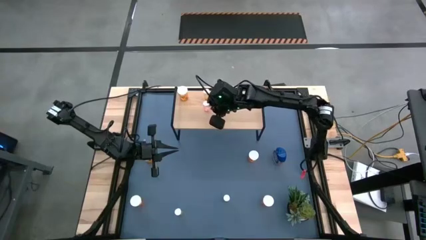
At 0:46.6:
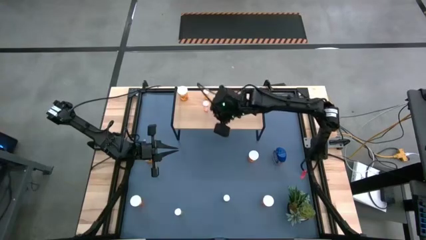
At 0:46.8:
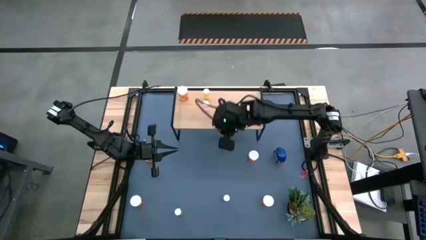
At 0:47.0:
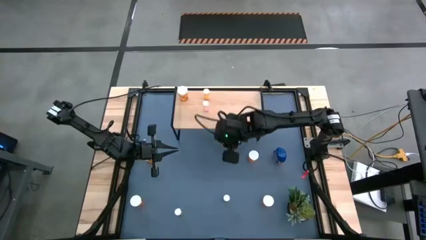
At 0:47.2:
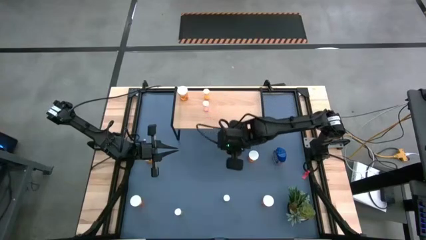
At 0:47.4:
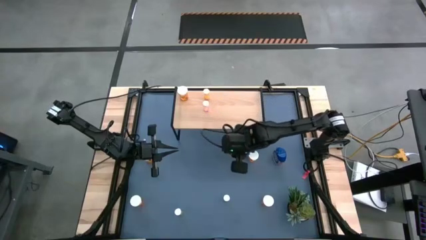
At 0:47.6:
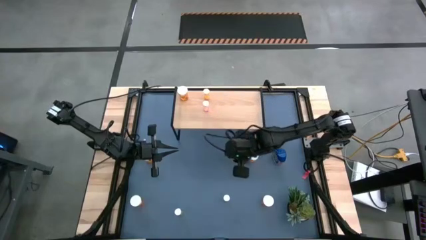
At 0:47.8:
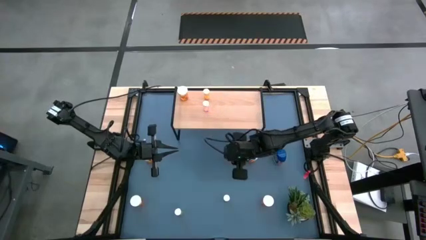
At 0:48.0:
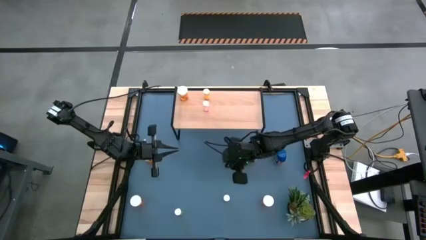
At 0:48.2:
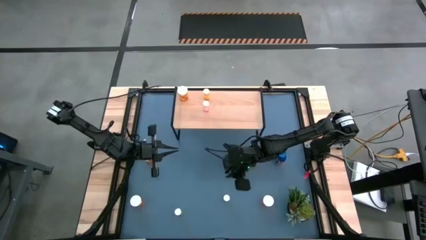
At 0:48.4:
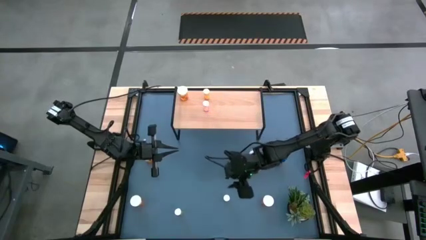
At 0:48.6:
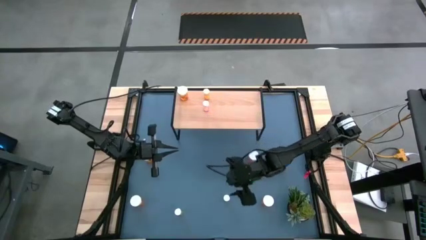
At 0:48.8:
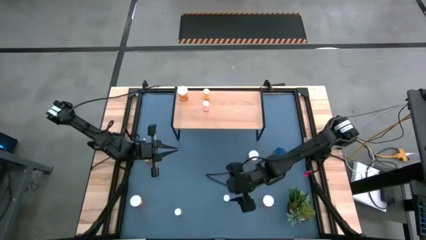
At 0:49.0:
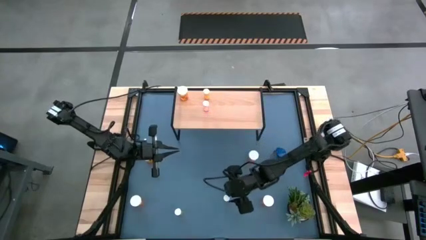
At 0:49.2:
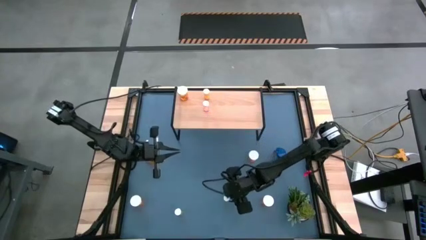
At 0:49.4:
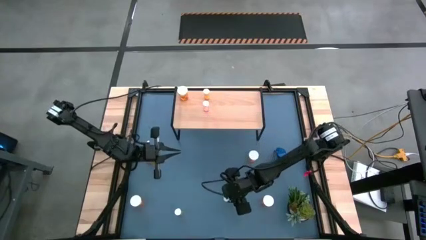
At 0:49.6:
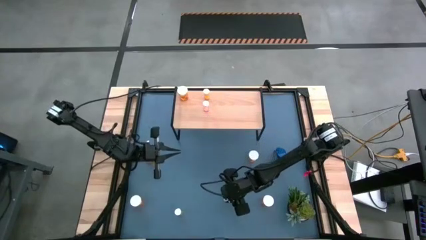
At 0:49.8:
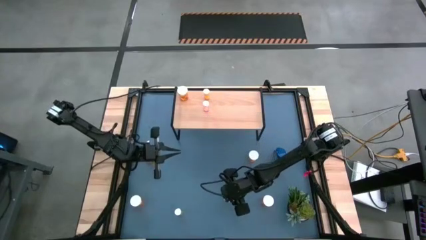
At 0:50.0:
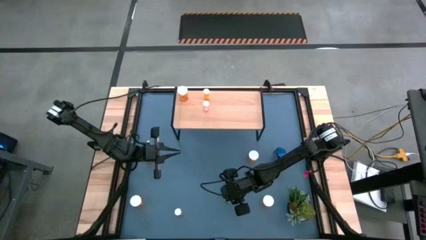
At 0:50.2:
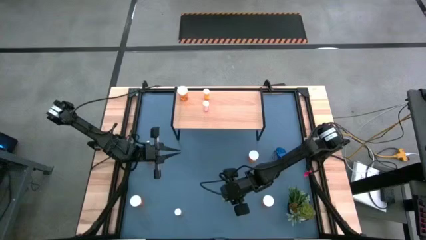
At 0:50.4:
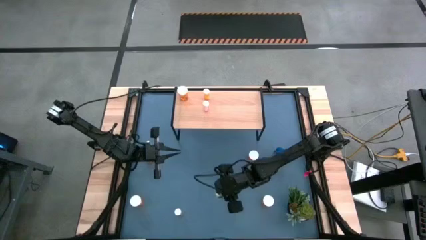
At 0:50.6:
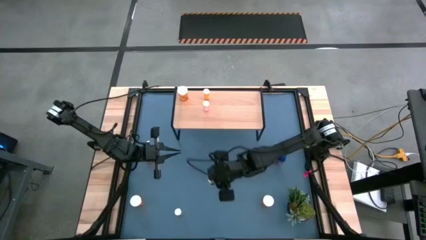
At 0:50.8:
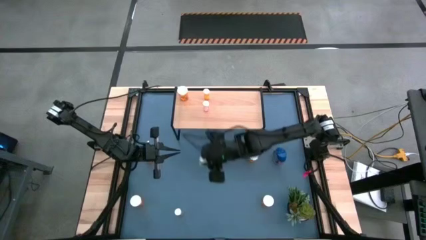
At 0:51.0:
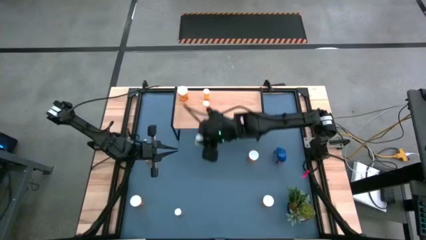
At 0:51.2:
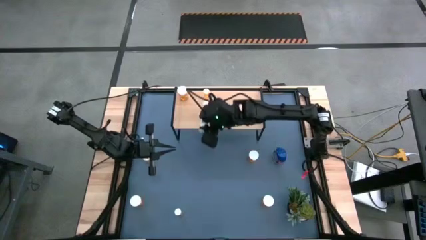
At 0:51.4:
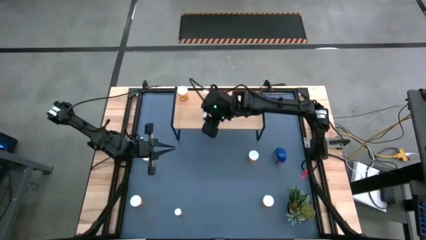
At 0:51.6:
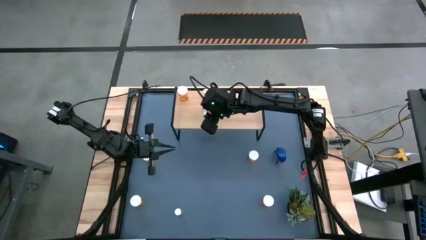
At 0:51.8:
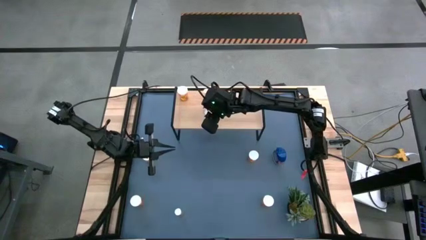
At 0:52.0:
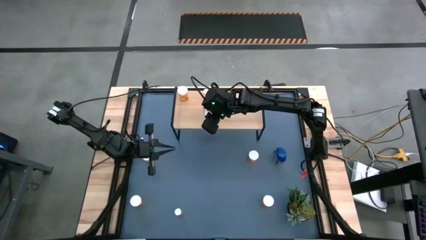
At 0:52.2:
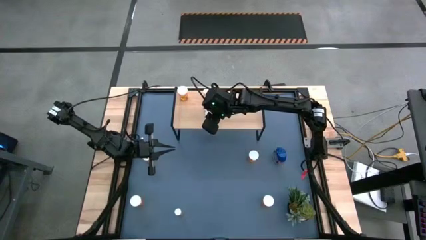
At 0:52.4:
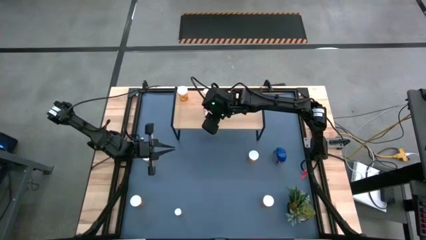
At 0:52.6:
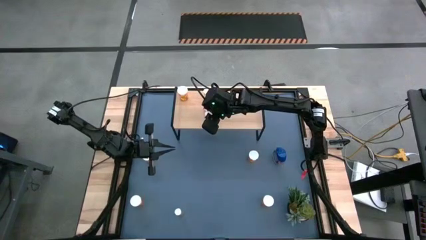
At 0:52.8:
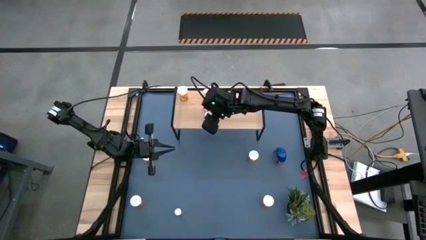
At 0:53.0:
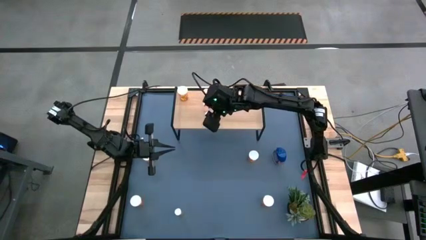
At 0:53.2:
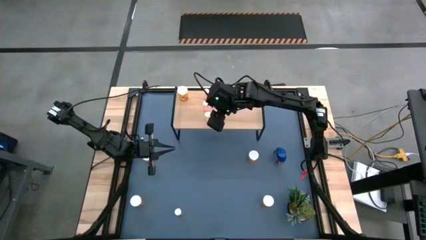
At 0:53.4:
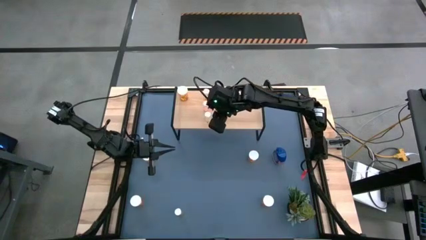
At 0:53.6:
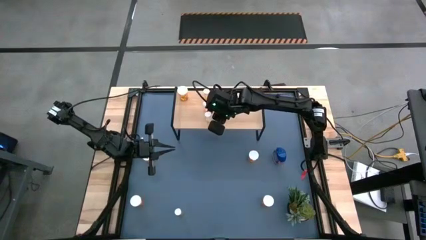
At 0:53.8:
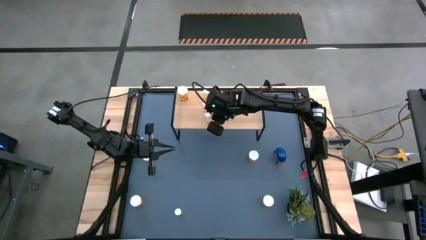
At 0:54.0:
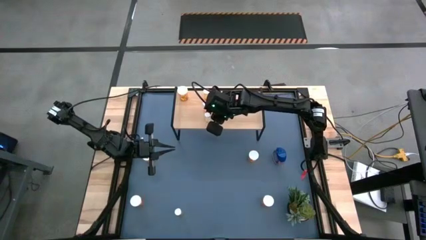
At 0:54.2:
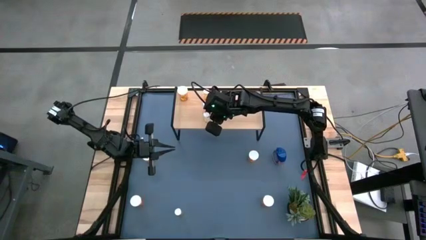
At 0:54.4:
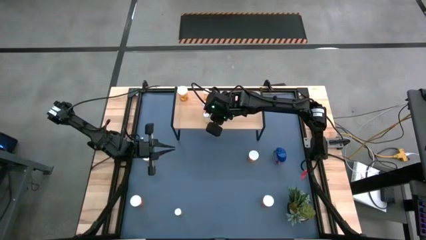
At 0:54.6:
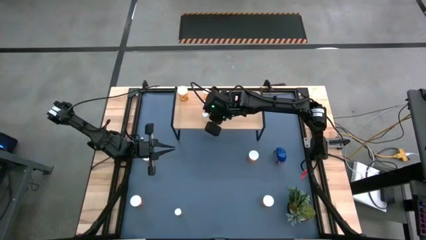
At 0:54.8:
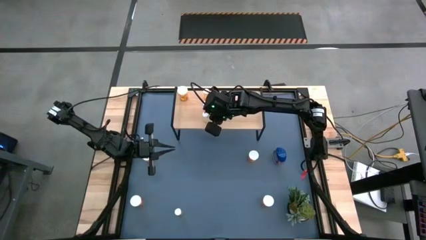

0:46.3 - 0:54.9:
Task: Pick and place medicine bottles onto shelf by color
Put the small pill bottle on the shelf

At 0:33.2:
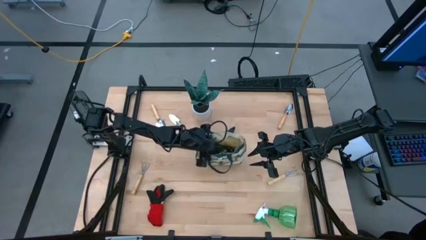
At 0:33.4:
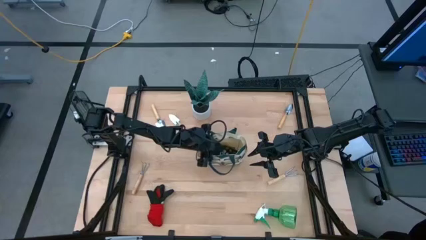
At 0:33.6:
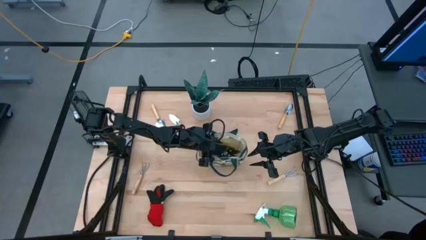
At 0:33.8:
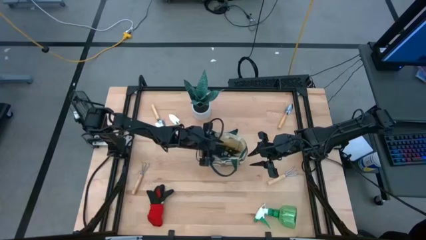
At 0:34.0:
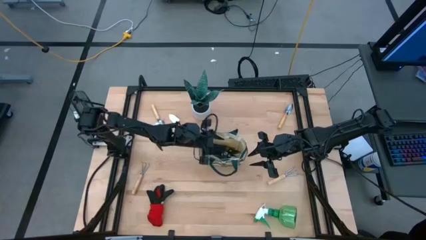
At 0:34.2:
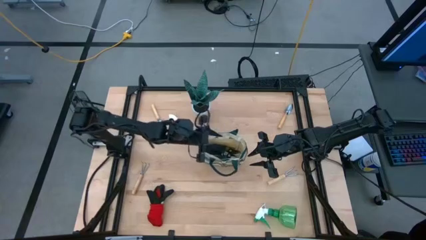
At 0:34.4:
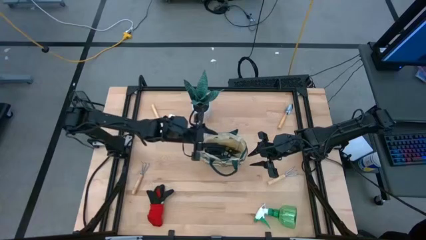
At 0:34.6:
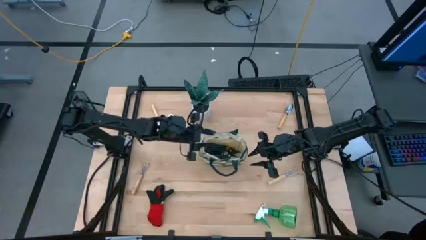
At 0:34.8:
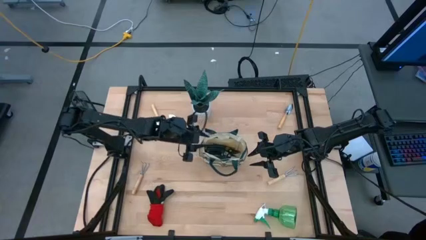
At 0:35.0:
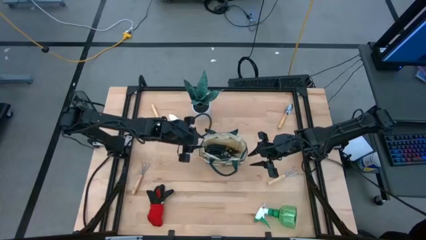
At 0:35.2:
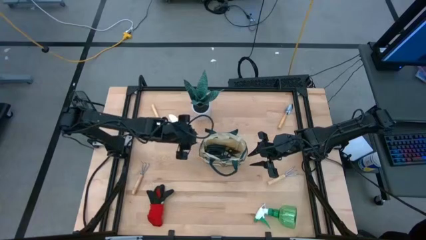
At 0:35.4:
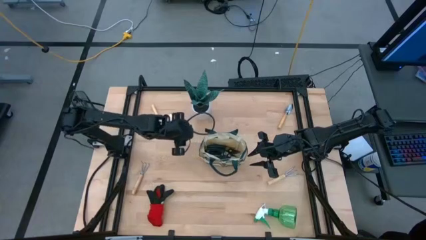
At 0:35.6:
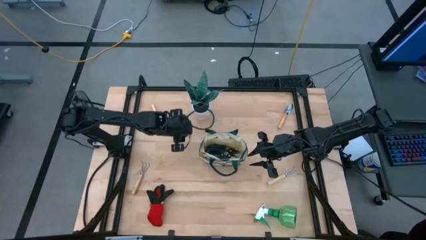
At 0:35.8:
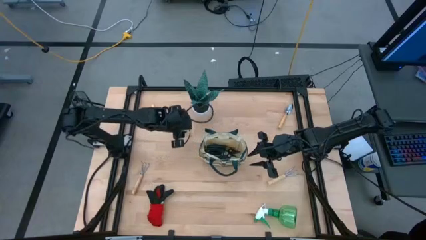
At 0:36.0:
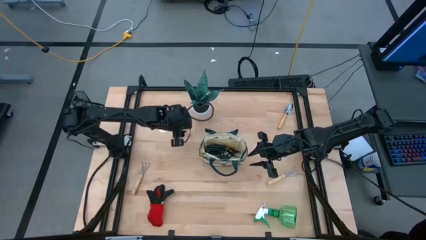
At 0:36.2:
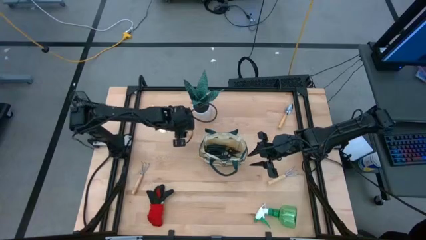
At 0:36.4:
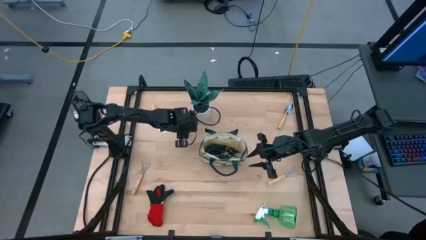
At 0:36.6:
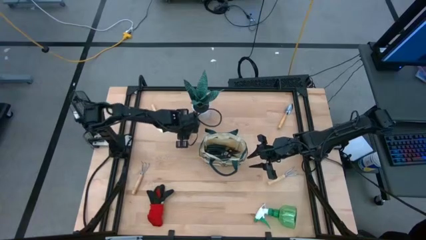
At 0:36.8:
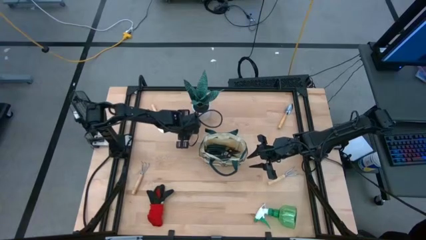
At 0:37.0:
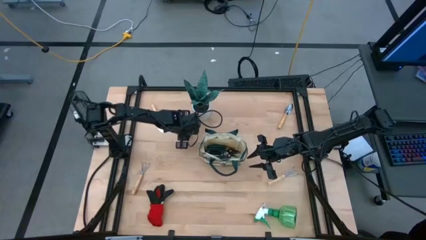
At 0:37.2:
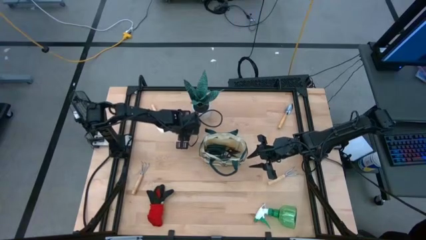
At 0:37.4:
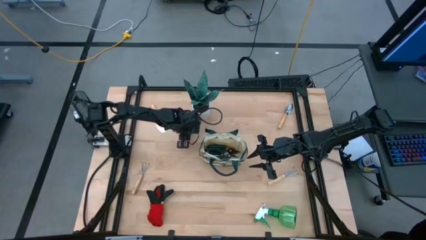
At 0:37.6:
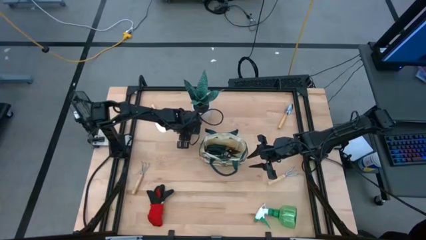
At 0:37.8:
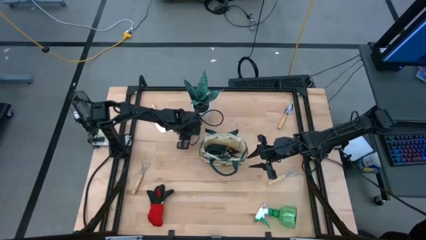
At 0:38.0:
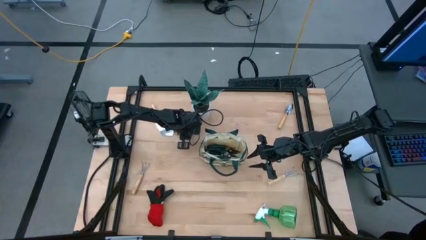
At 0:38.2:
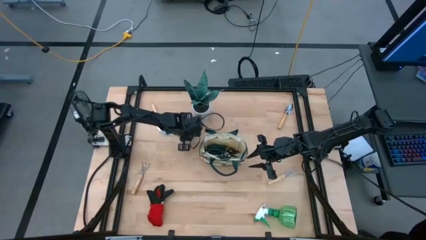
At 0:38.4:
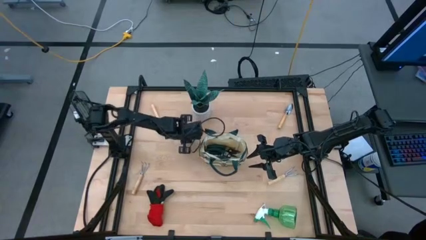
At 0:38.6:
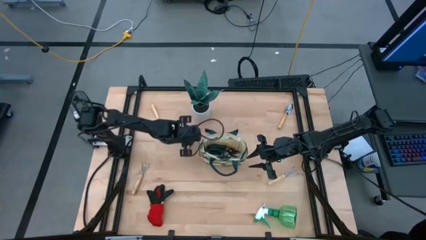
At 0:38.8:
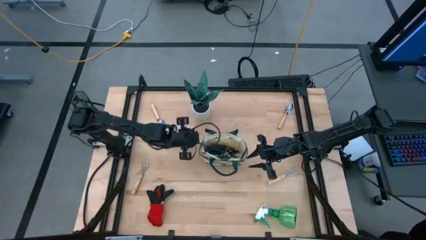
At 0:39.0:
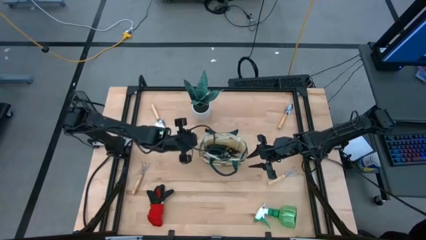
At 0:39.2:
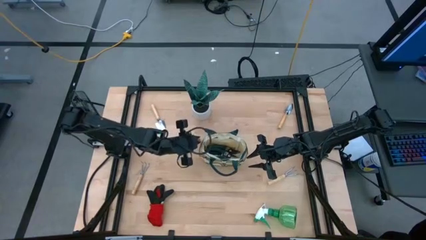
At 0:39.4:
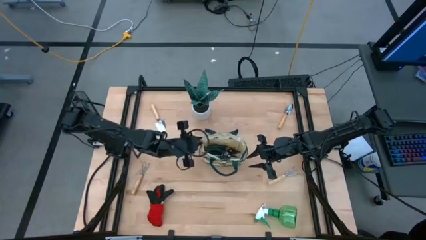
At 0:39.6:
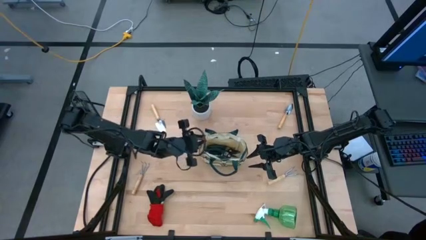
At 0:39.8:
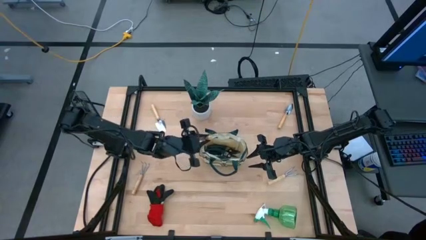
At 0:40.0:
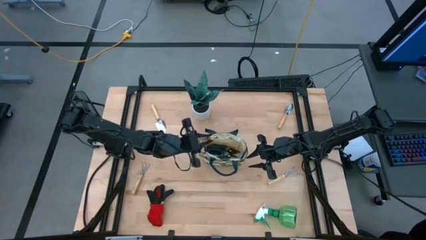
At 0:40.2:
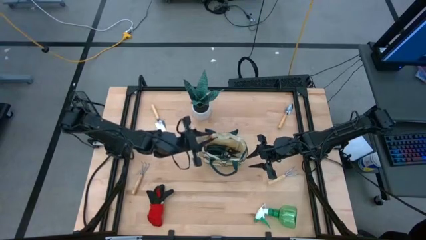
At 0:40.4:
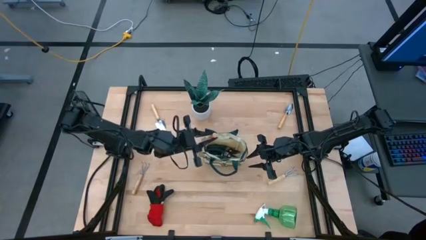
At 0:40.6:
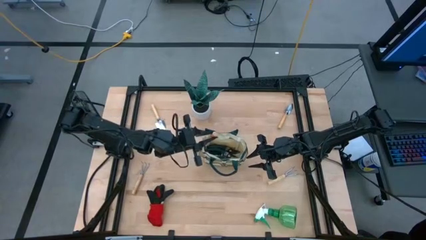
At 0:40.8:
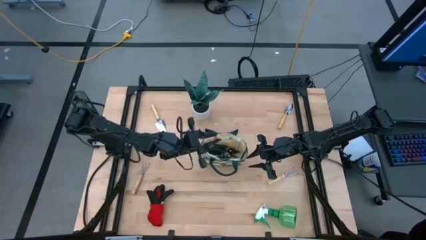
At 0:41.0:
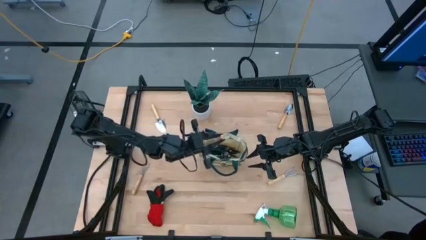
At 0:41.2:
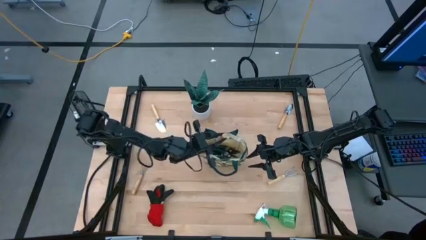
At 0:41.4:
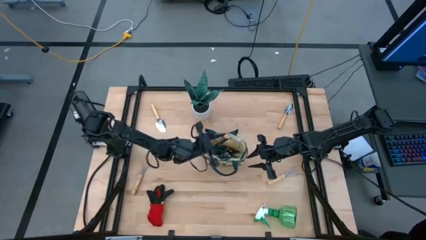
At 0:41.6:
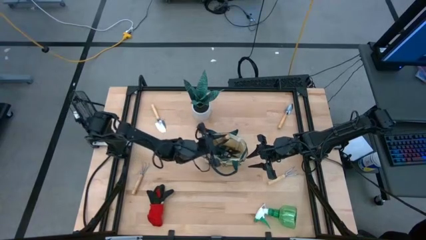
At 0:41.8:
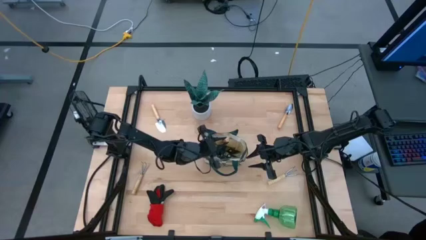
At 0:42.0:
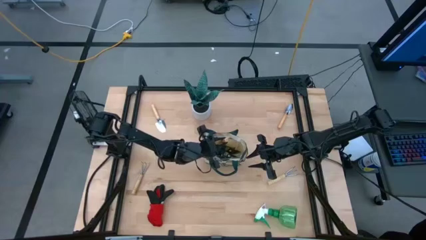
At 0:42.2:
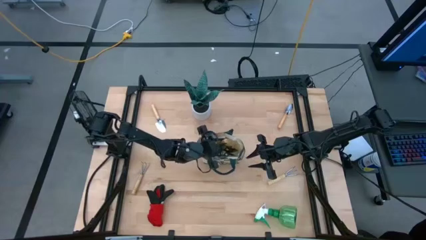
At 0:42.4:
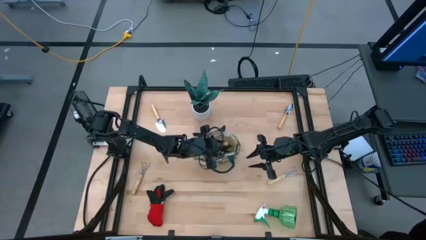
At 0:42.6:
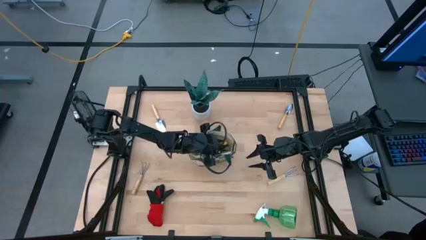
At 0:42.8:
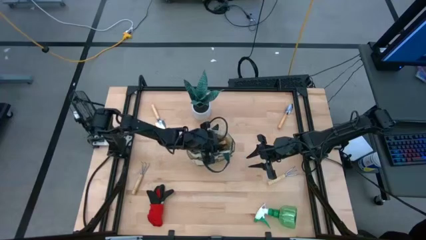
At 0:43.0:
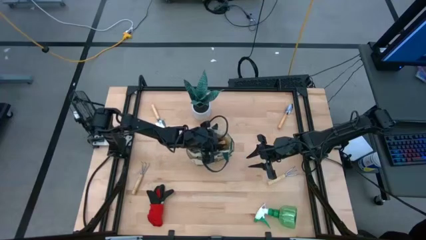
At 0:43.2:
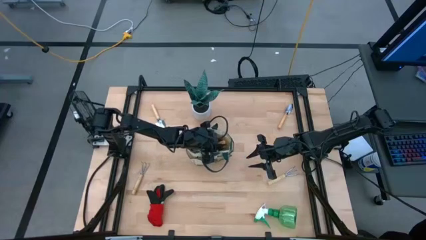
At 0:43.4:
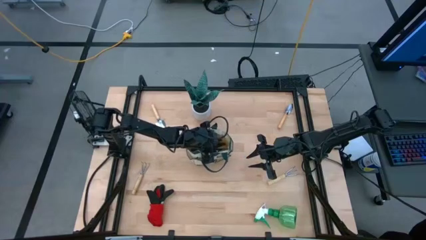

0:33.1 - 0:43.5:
Task: Pick & Place Garden tools in Gardening bag
Put the middle trowel into the gardening bag
